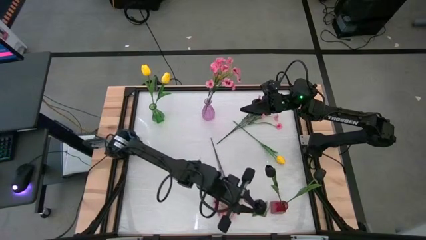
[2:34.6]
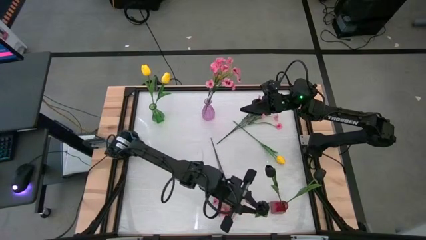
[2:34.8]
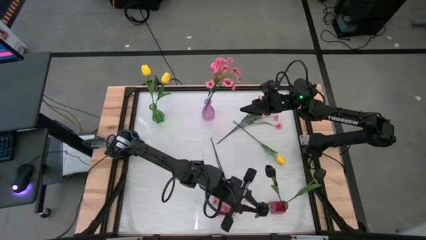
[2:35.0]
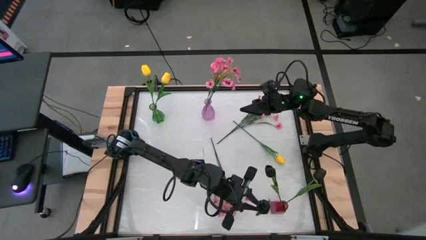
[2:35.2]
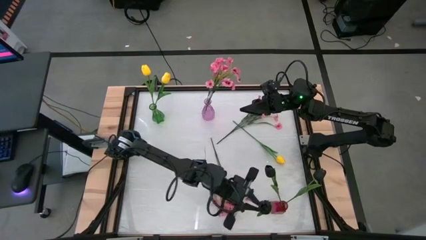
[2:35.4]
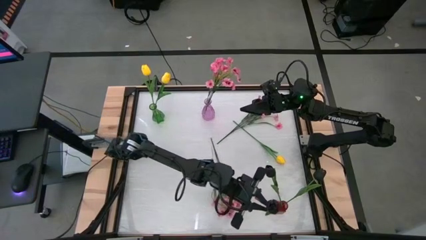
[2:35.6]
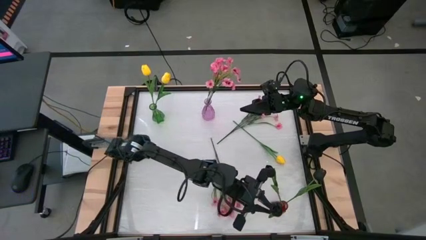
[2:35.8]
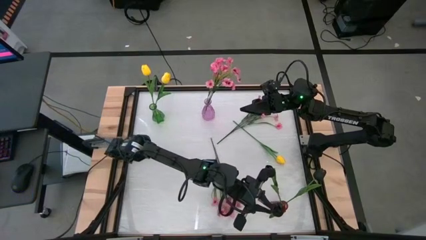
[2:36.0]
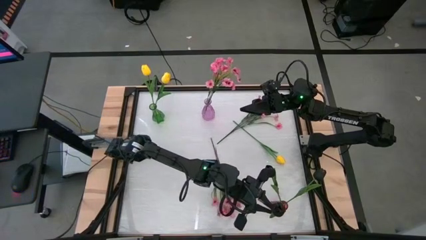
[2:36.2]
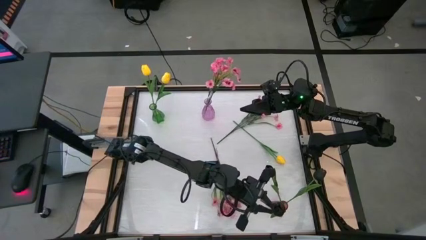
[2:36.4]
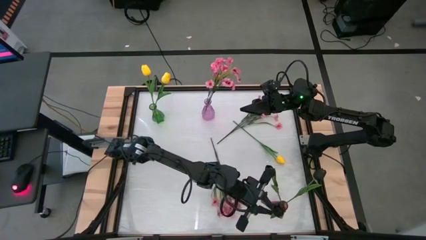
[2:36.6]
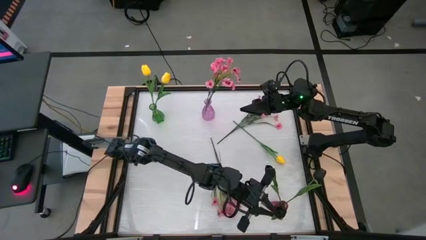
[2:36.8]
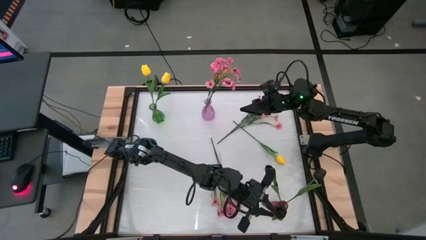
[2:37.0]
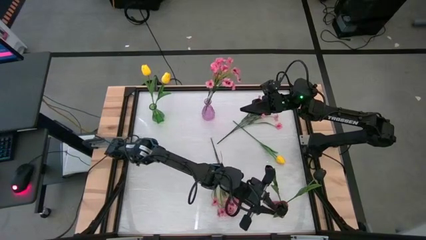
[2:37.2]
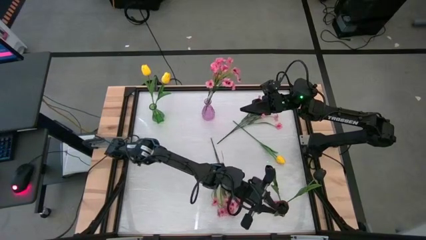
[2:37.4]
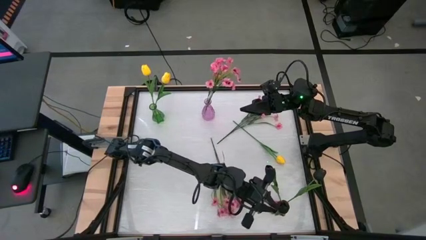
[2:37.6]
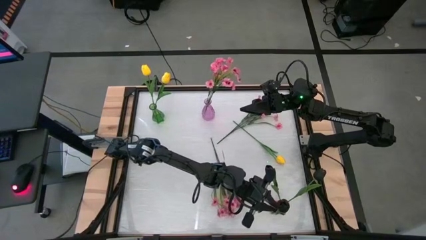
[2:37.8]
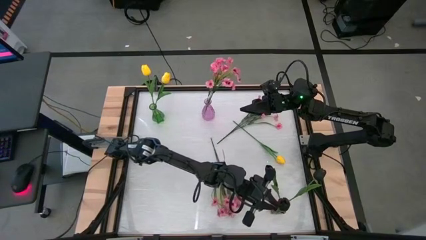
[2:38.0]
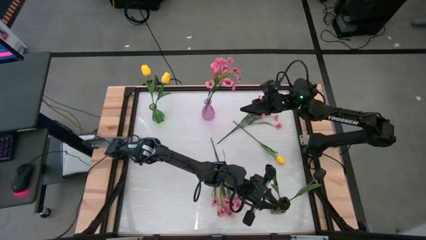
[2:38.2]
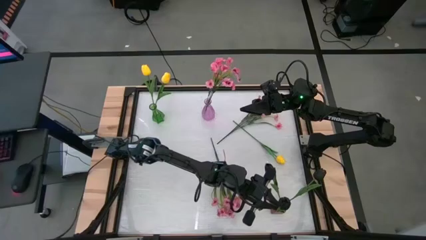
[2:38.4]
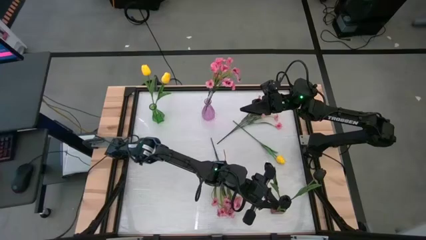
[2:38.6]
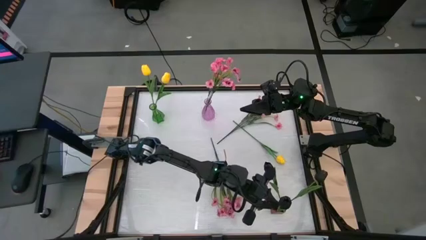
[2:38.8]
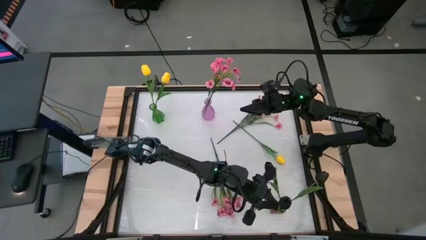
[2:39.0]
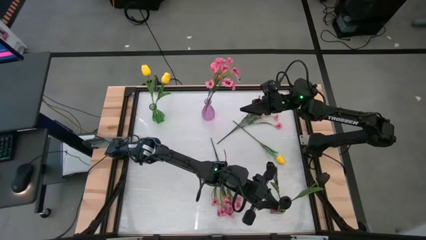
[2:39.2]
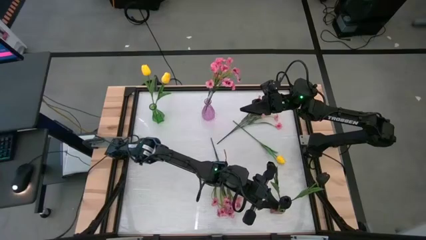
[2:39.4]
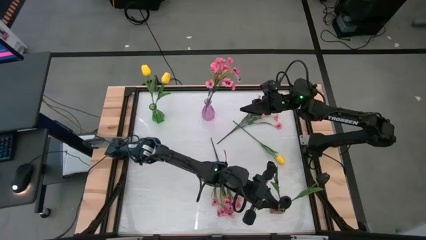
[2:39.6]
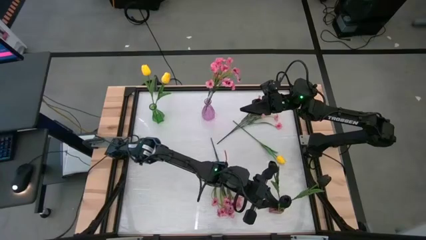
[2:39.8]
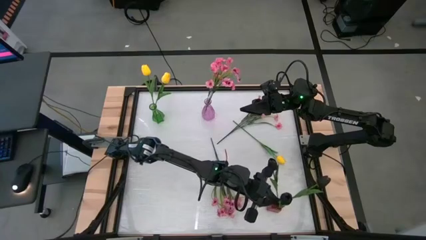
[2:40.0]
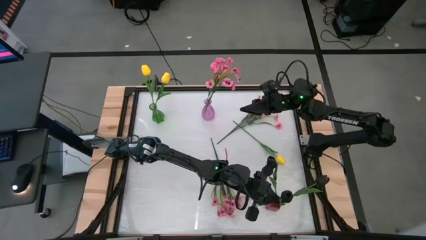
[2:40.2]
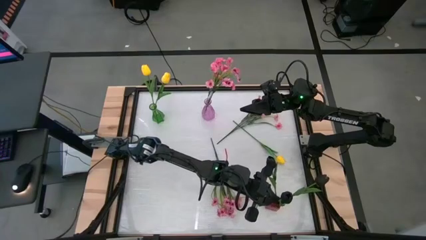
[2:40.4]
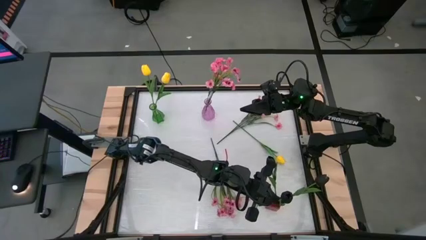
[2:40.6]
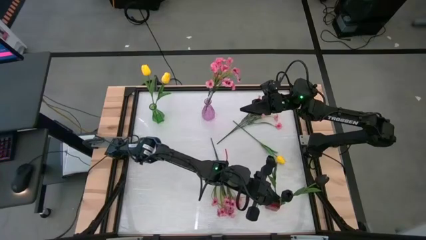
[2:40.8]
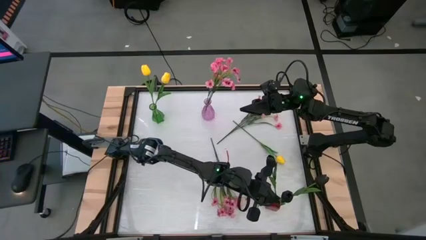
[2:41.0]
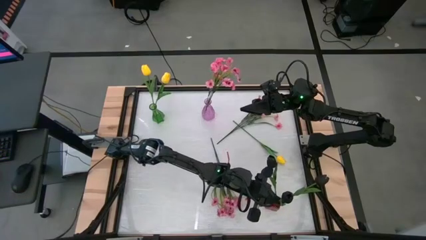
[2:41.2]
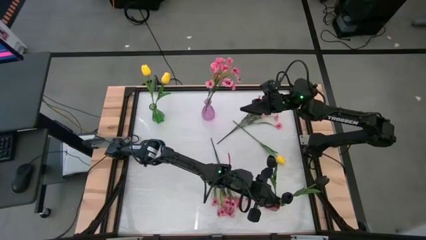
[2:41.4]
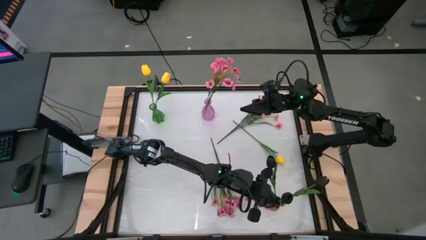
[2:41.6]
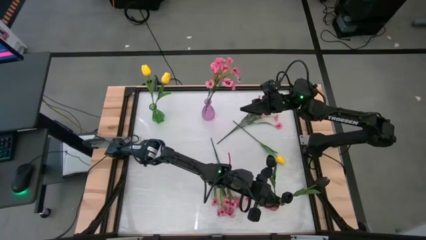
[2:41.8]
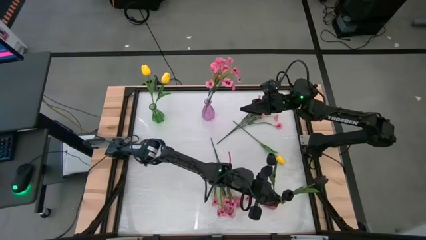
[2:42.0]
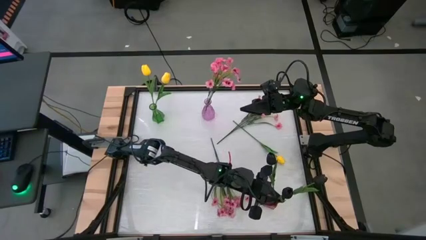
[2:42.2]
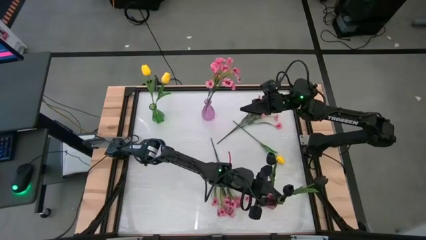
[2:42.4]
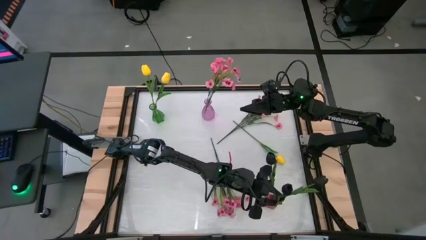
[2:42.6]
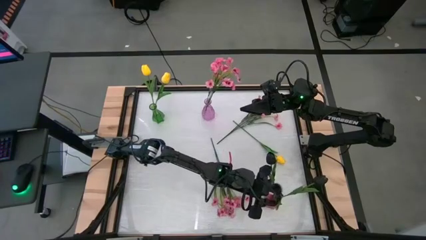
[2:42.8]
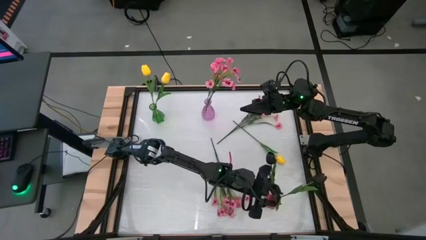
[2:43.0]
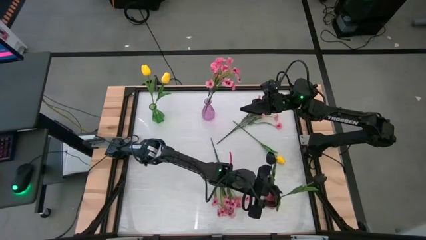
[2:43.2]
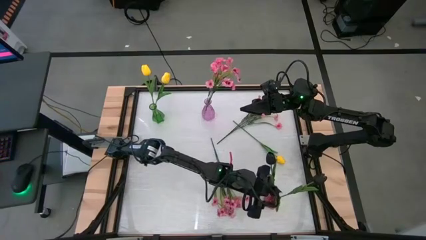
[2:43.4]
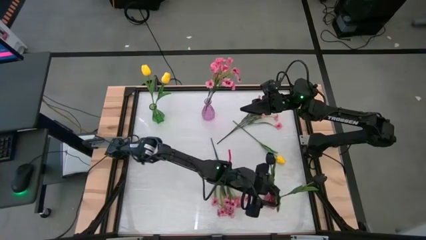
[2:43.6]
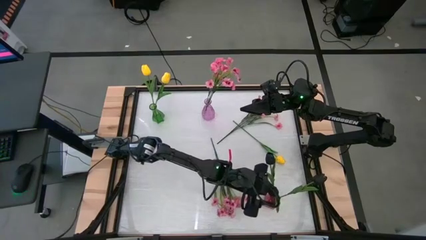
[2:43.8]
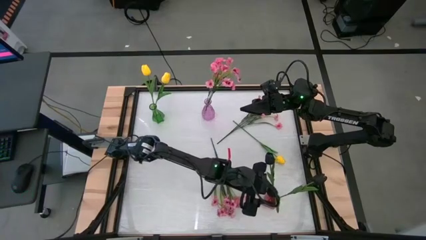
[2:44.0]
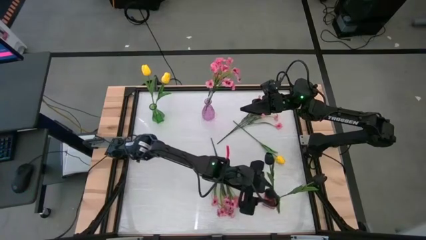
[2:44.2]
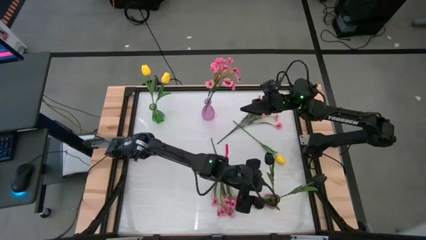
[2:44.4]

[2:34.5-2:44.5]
Task: Sort flowers into vase by color
Put the black flower into the red vase

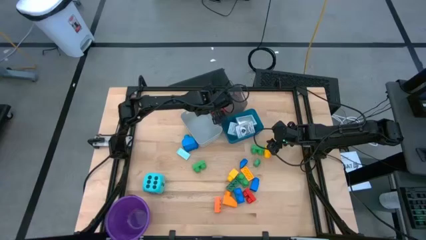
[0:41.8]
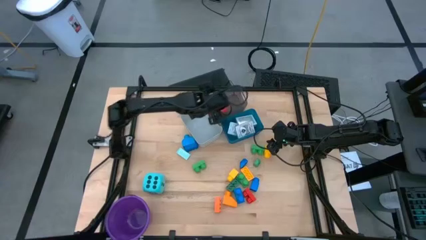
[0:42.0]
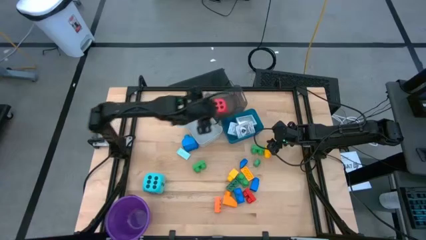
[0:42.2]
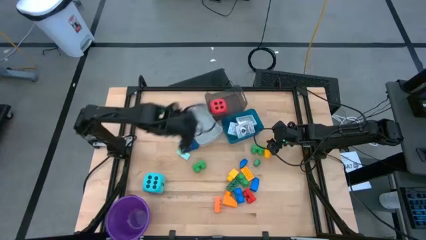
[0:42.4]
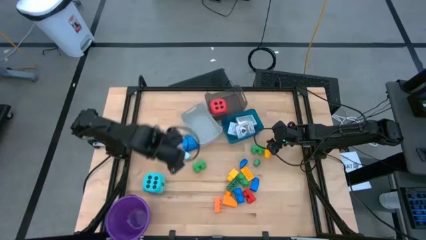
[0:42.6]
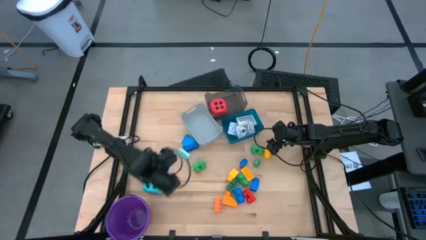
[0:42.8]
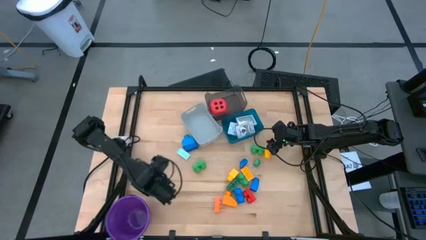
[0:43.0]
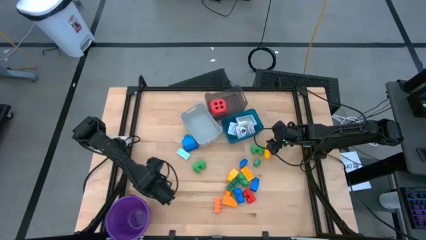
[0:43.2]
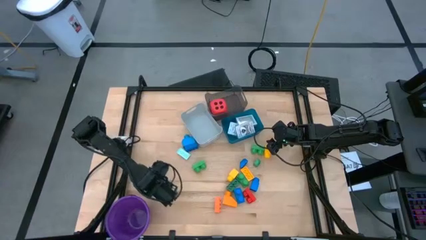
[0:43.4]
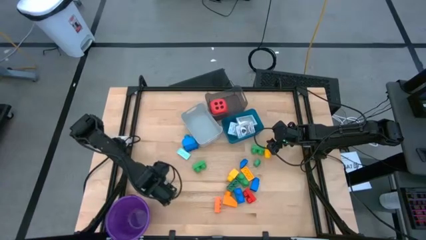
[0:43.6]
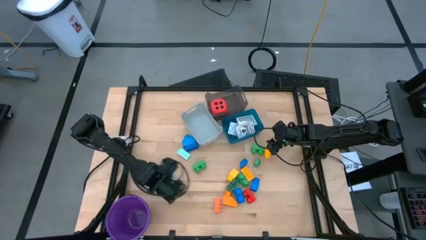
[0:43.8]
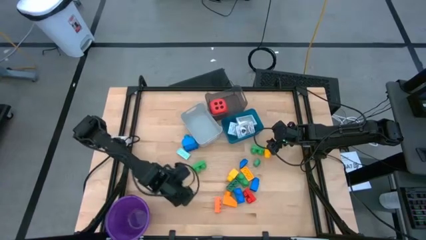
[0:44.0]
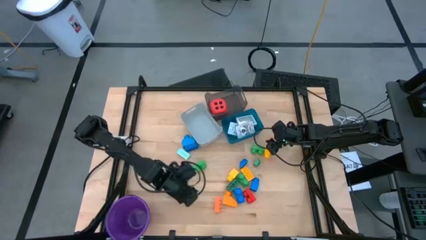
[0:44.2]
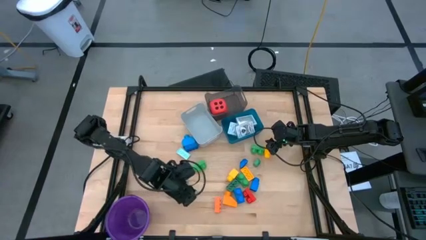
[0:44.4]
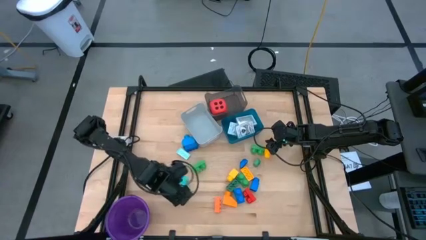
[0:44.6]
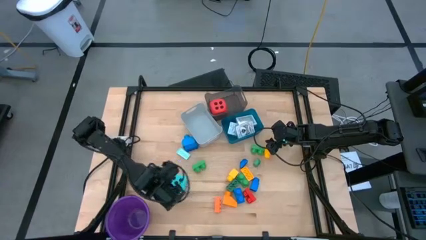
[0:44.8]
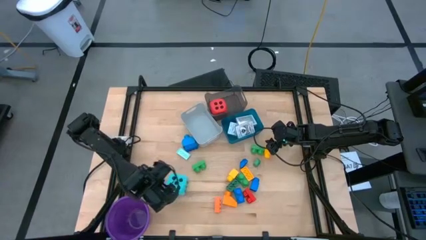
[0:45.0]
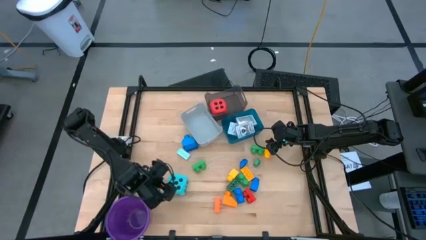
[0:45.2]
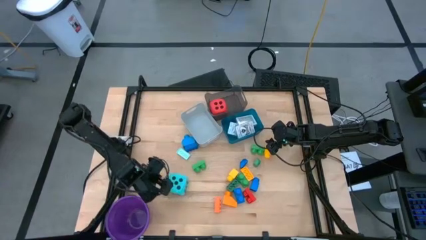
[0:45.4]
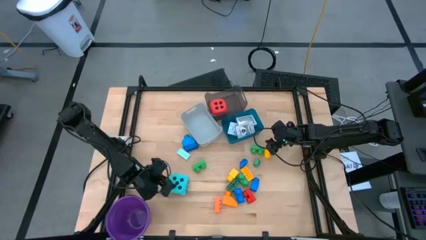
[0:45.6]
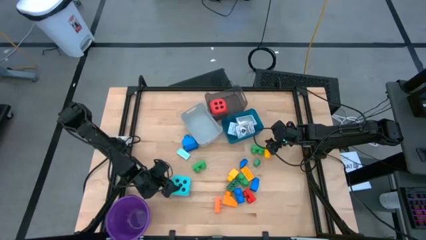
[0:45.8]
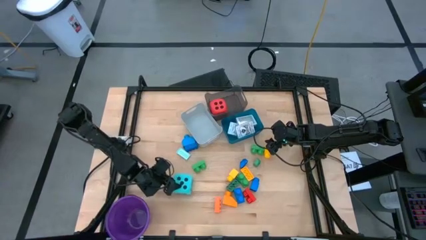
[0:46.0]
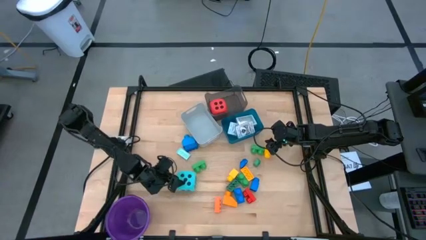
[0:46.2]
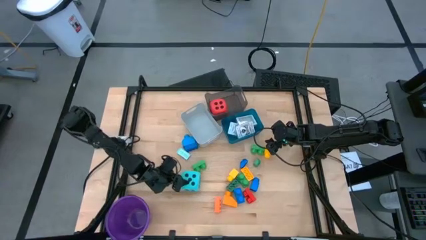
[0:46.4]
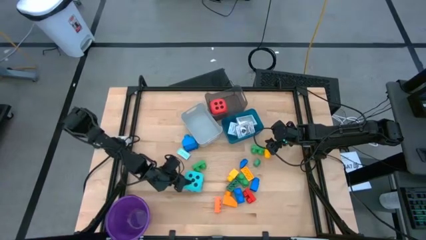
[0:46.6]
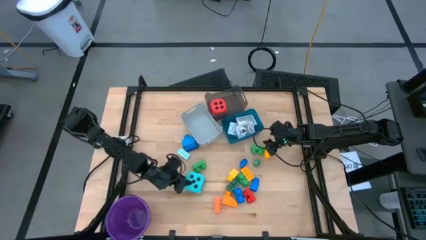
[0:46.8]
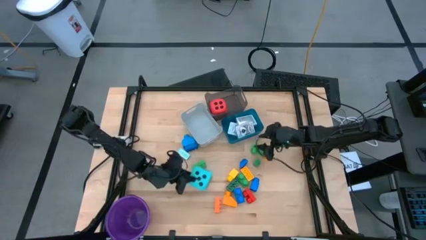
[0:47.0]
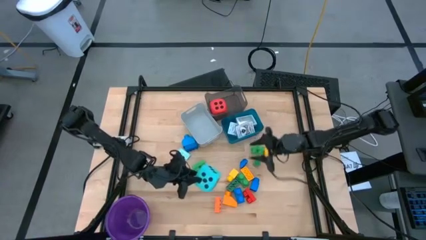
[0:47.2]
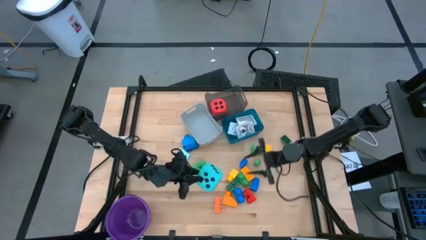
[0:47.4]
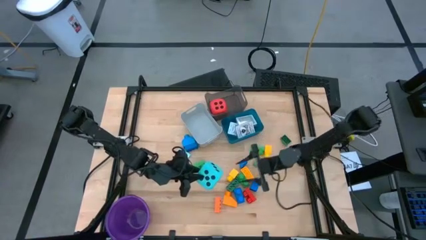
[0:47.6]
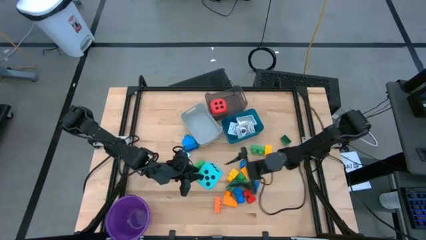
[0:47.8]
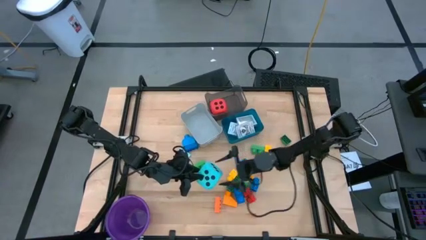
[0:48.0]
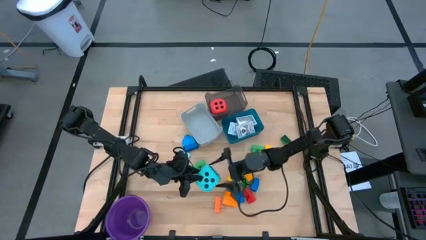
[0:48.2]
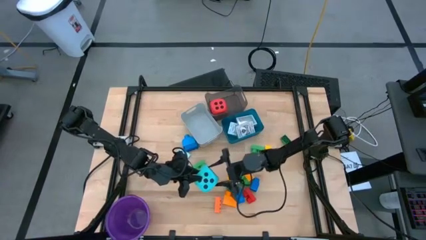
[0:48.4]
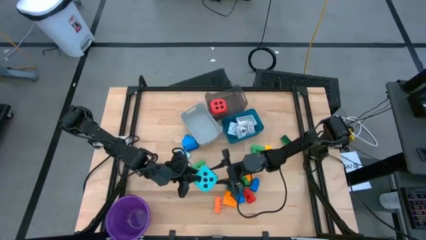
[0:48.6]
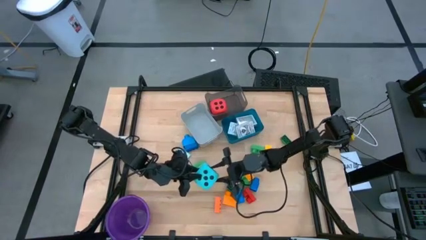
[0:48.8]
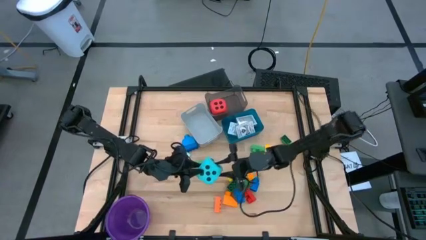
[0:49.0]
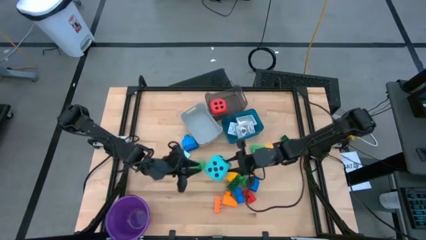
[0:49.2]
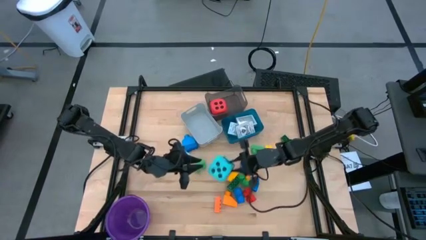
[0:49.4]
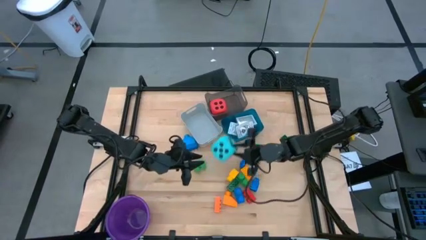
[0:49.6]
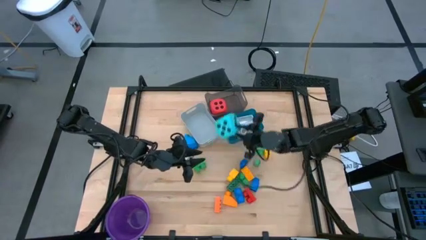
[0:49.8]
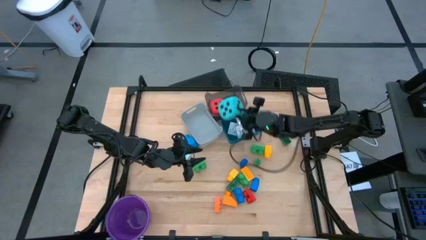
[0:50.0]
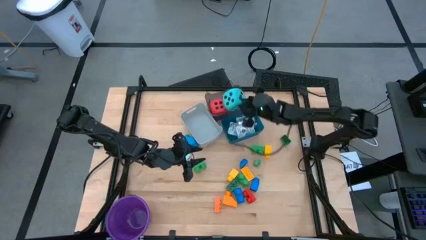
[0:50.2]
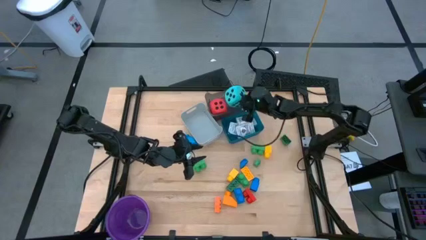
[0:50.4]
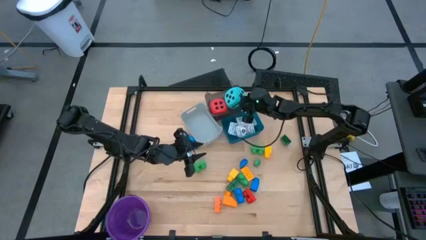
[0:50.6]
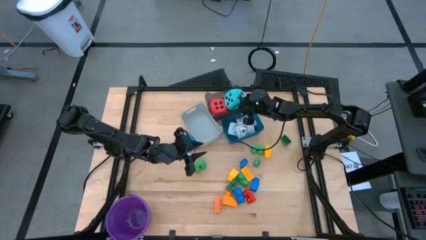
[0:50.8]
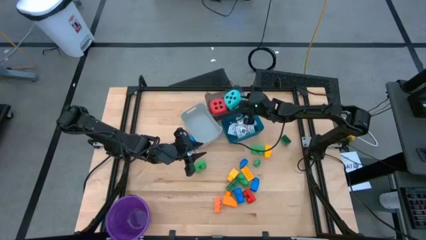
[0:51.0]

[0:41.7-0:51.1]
Task: Pick & Place Toys
Put the blue dice into the black bin
